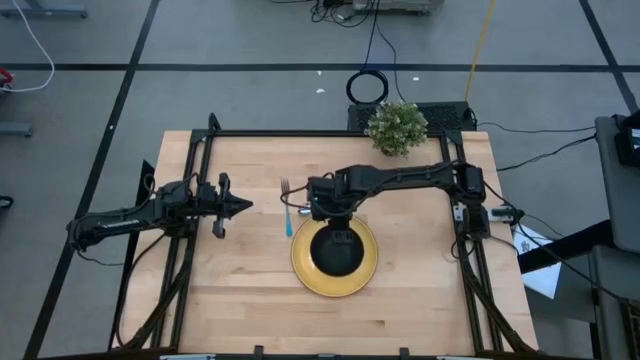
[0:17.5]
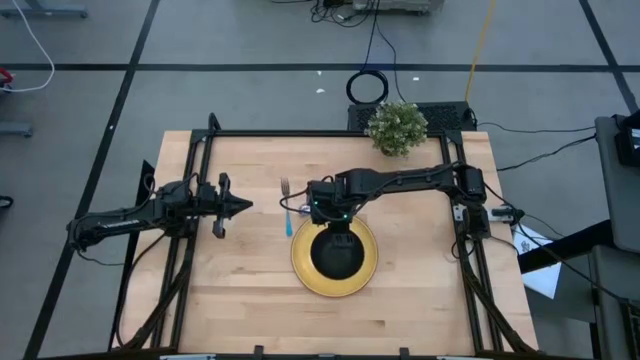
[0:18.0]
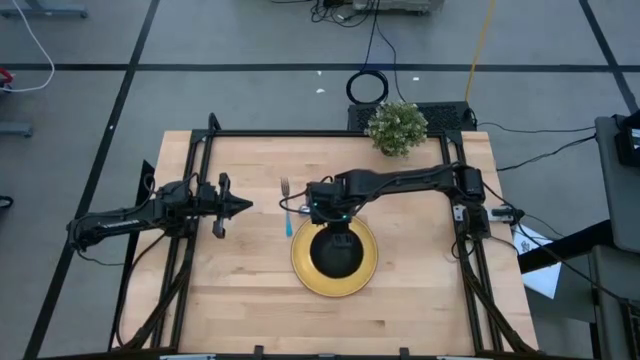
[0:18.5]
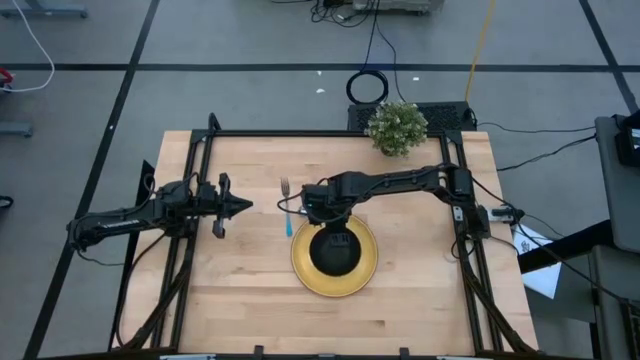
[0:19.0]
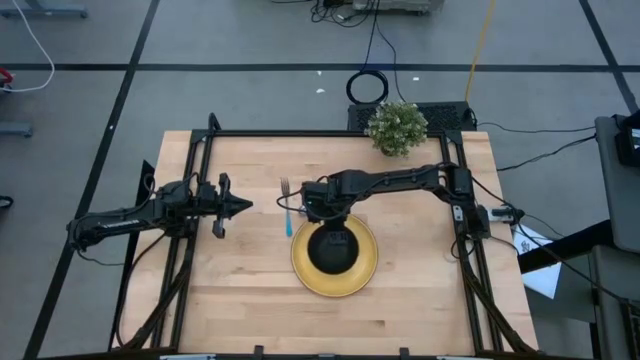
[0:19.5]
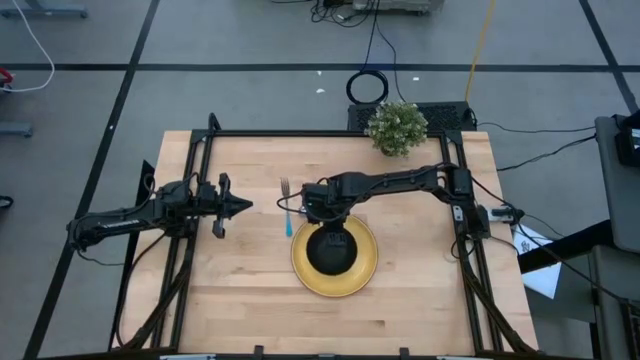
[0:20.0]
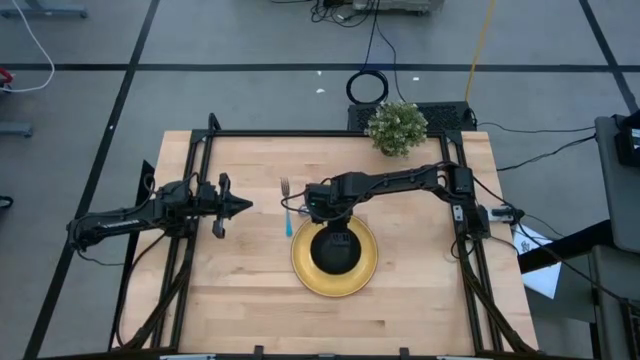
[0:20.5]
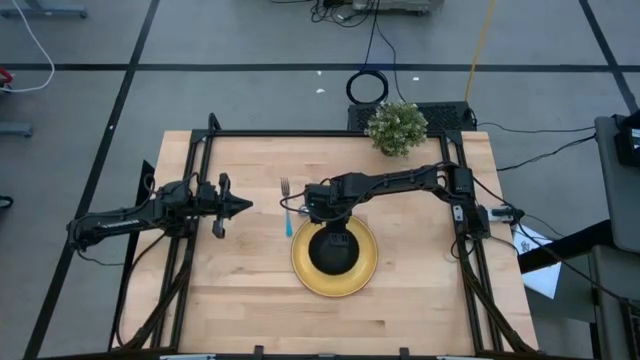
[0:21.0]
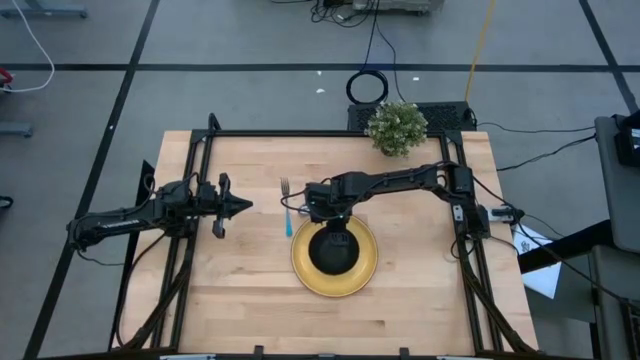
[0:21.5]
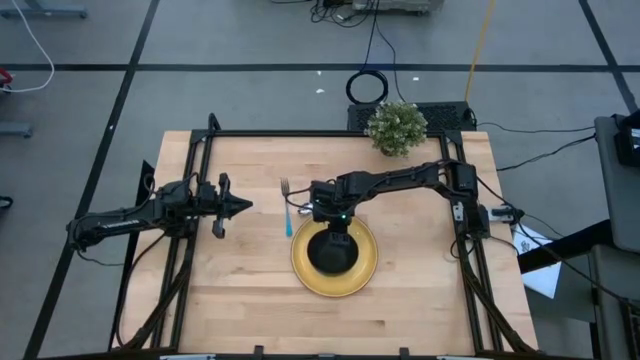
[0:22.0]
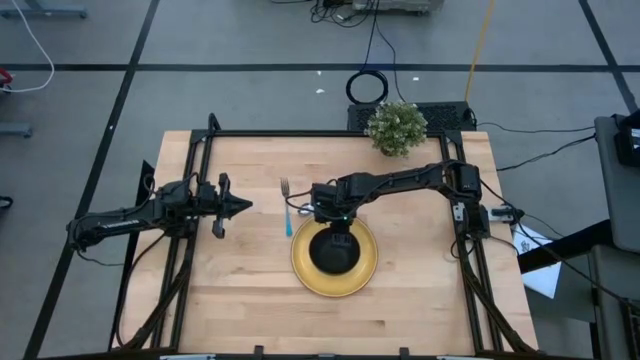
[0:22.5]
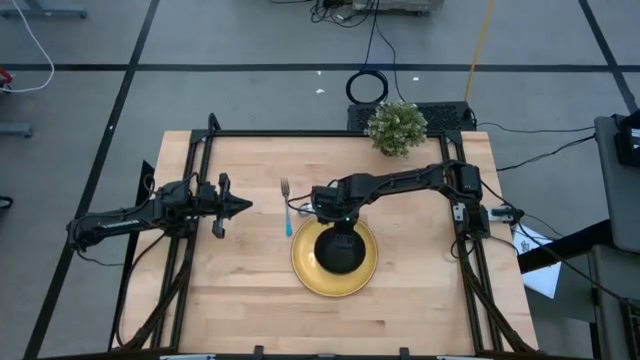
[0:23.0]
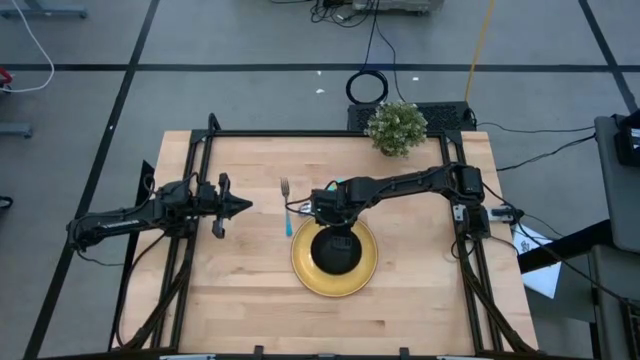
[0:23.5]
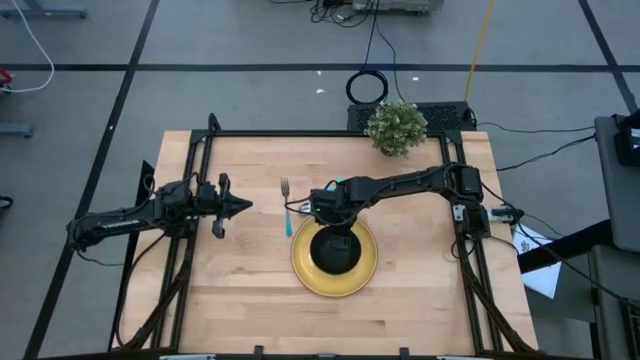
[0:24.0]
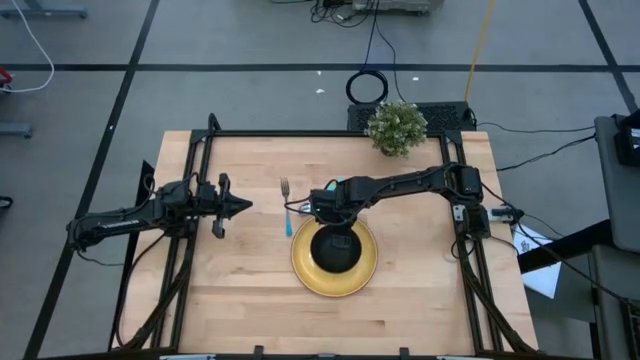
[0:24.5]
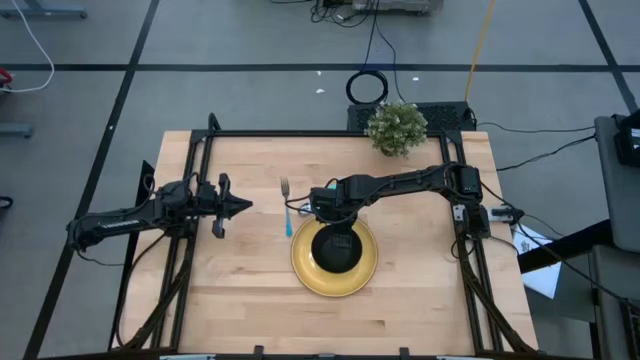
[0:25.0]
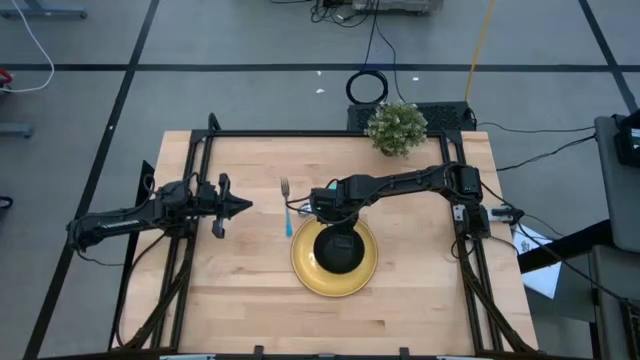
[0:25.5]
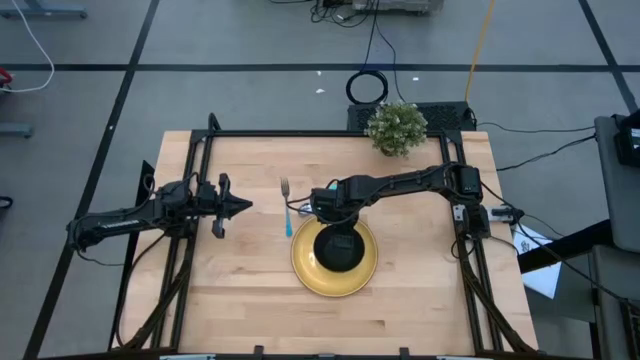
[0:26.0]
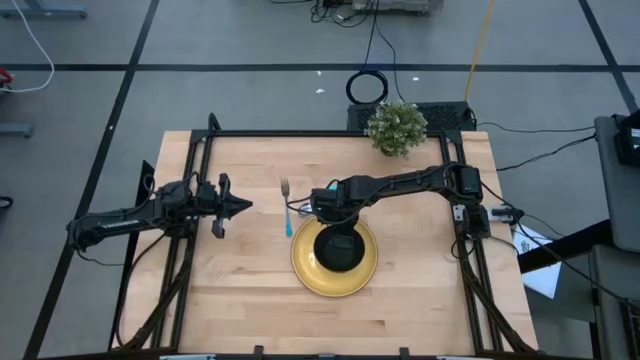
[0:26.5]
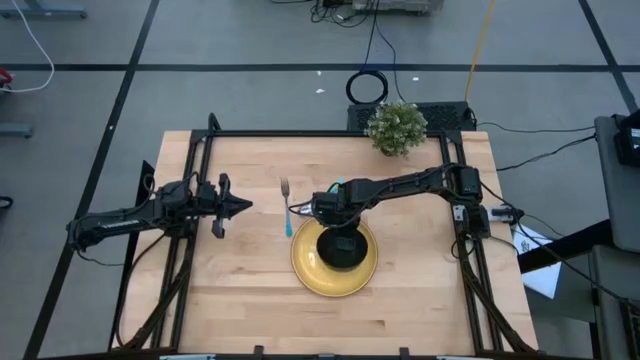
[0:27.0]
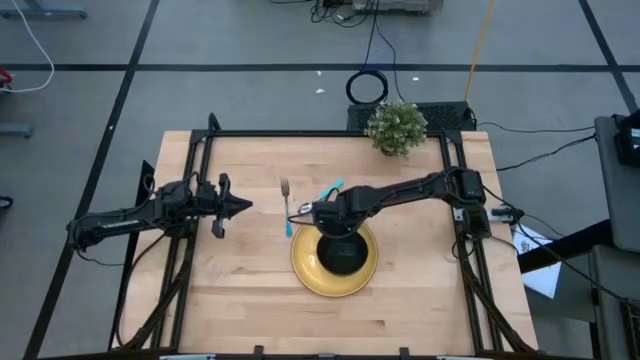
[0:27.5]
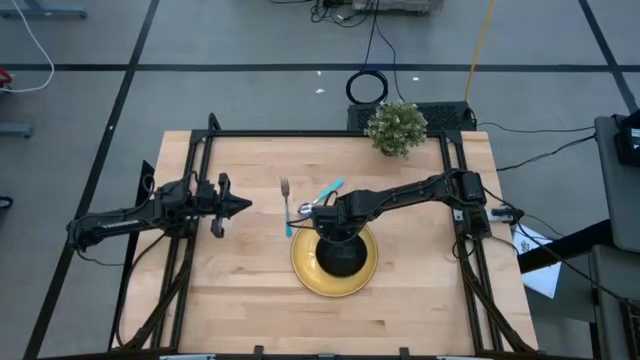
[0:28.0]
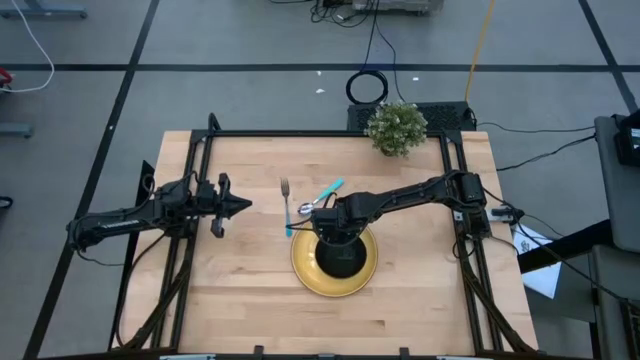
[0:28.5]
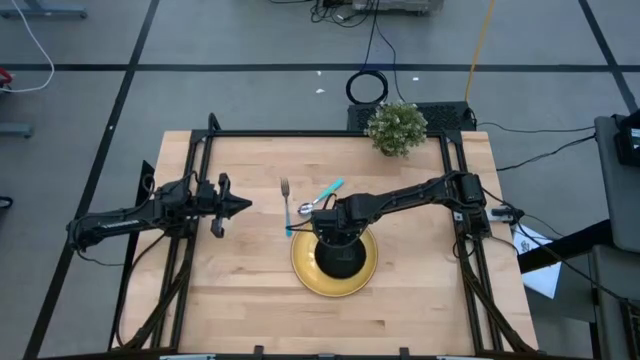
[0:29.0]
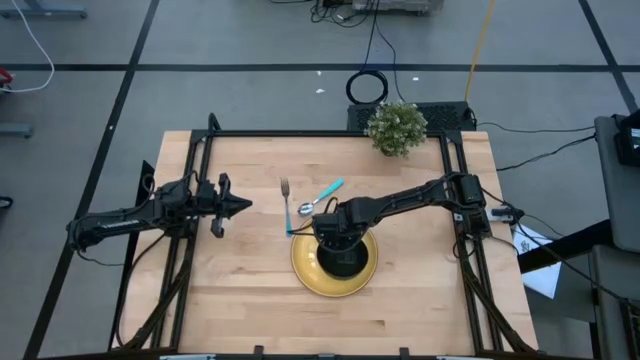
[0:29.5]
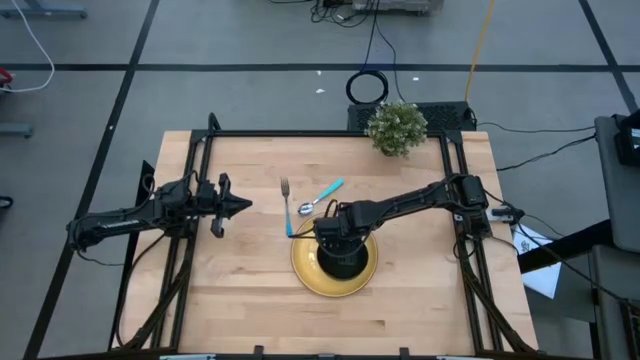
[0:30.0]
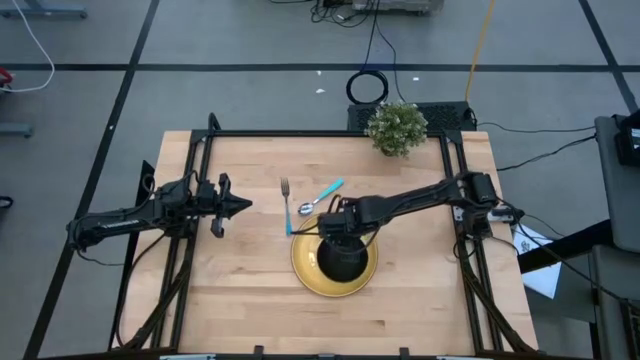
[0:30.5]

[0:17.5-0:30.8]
Task: Set table place
Put the black bowl on top of the yellow plate

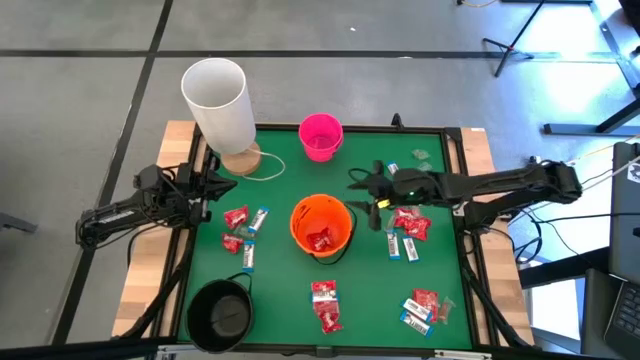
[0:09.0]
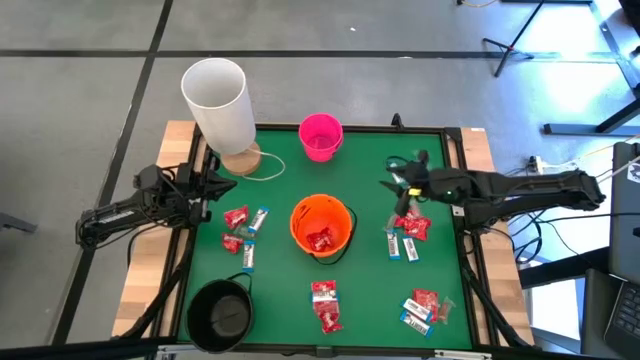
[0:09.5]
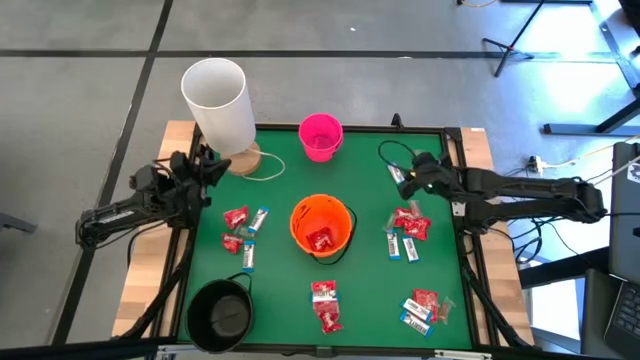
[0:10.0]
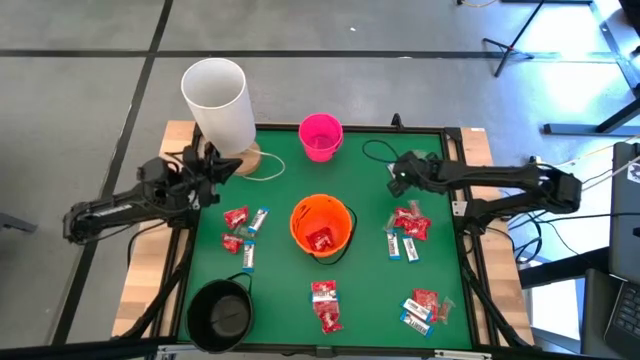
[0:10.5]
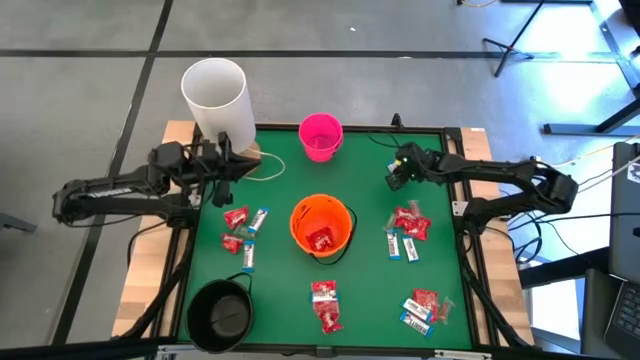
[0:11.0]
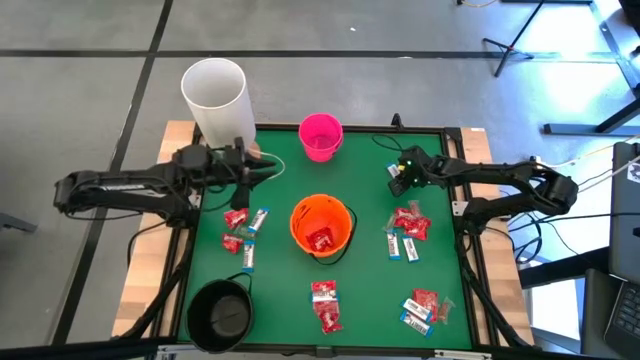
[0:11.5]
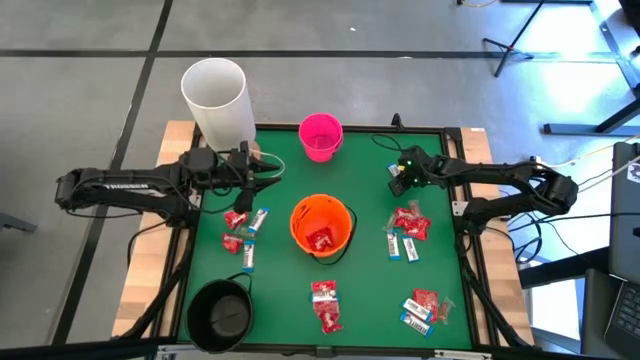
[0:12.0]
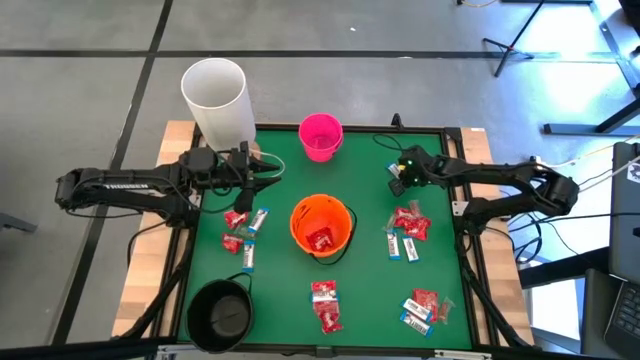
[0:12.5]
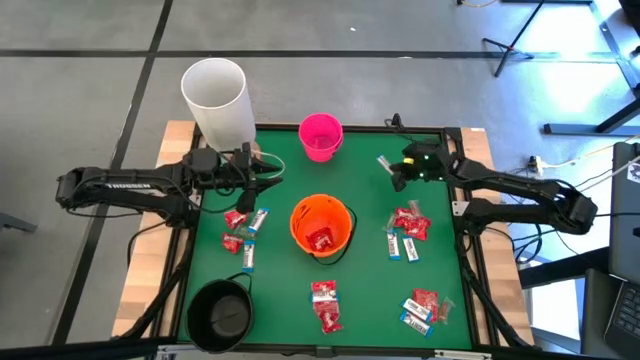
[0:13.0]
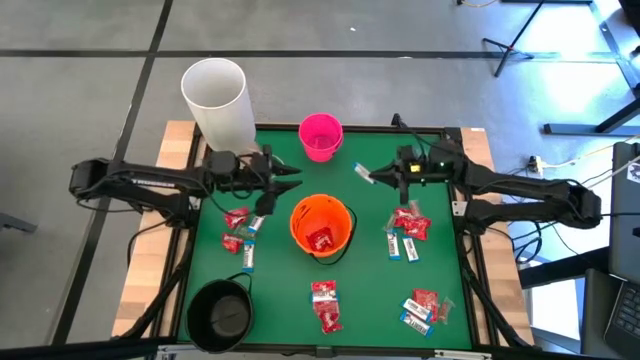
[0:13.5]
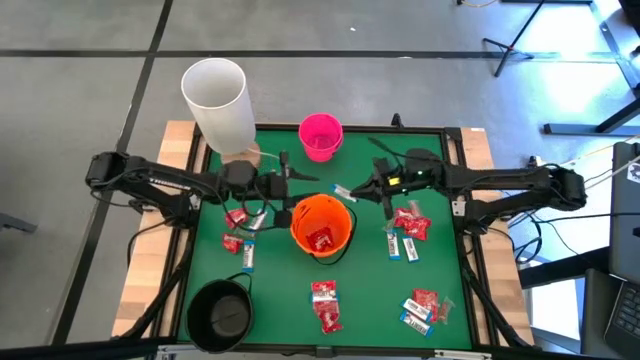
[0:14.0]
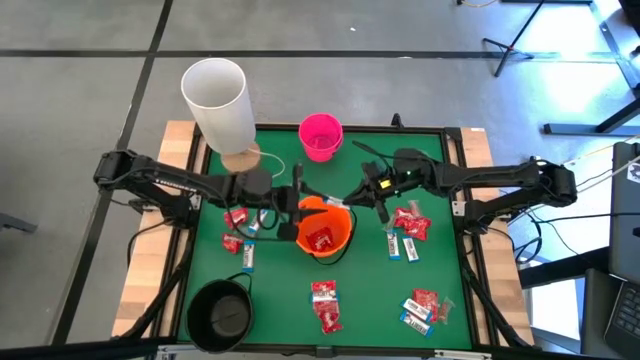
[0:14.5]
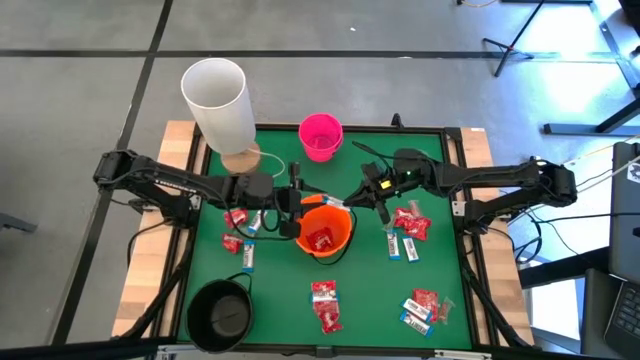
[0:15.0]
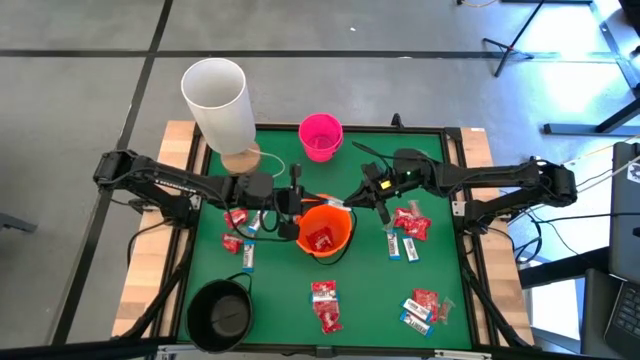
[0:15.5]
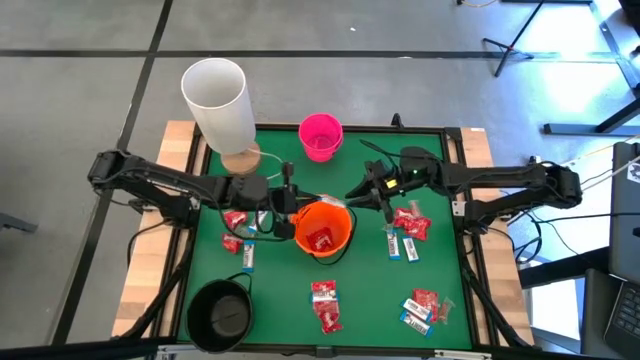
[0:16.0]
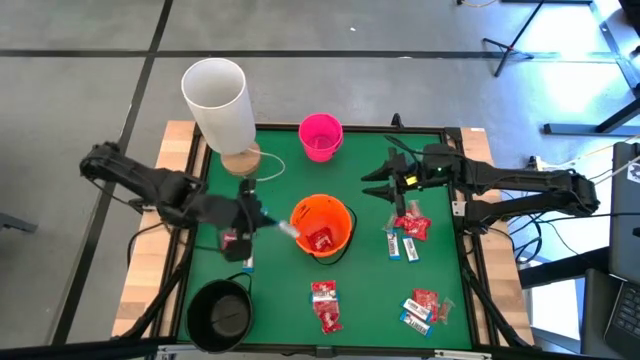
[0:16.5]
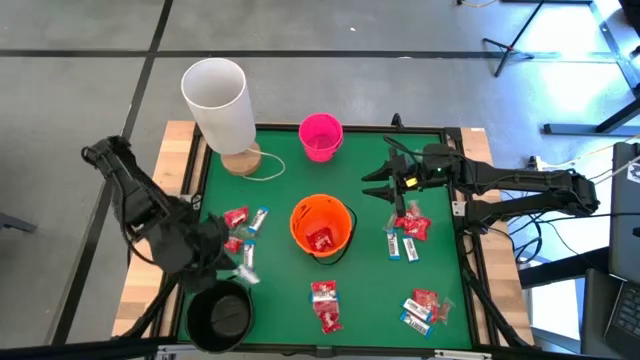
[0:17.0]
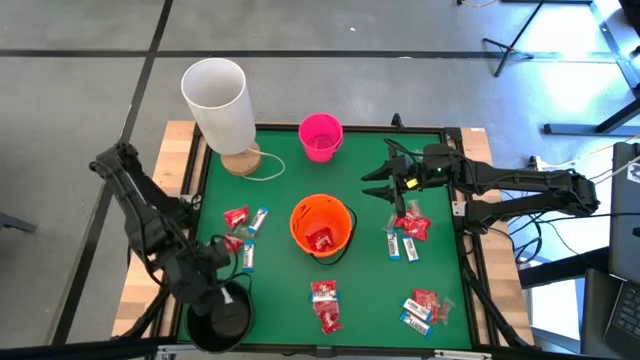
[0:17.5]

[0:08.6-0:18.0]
Task: Sort candy
Put the white chocolate into the black bucket
